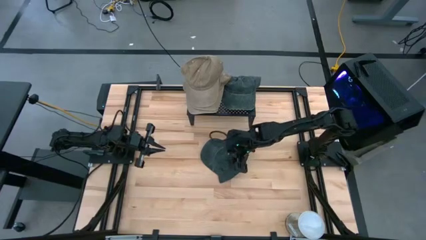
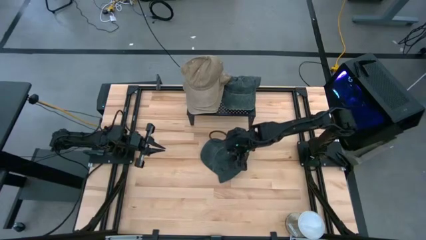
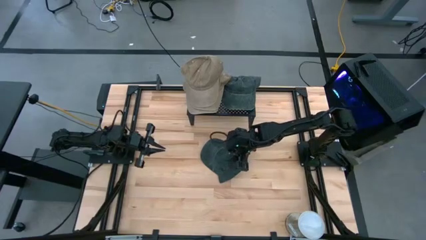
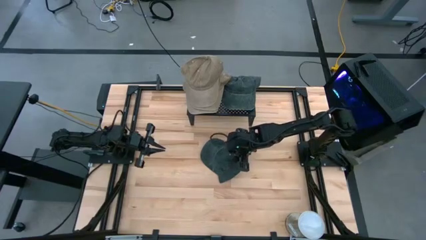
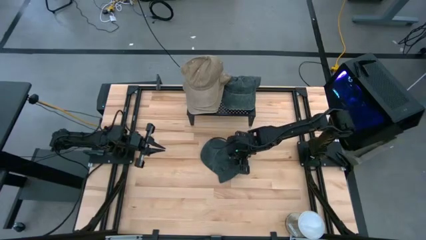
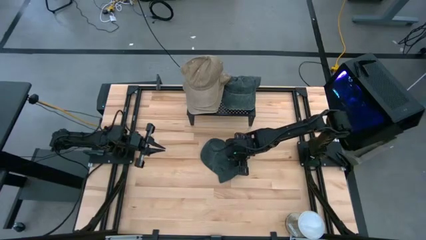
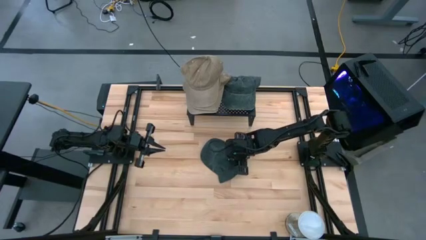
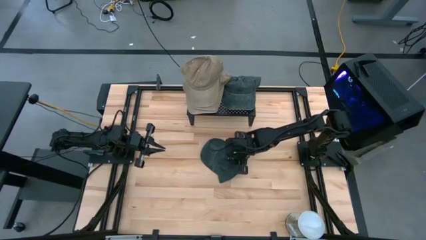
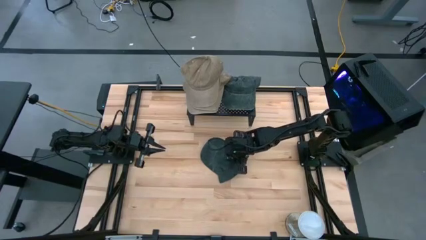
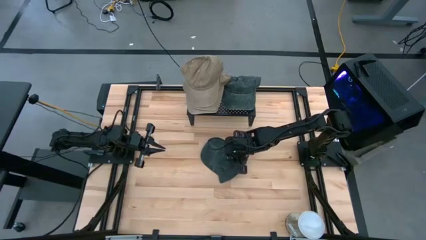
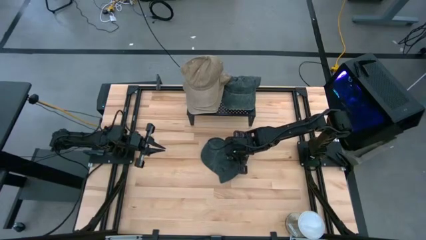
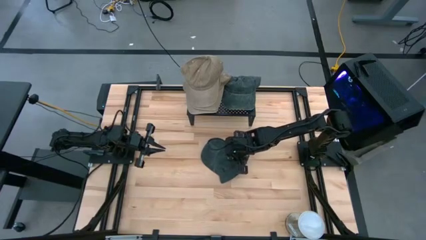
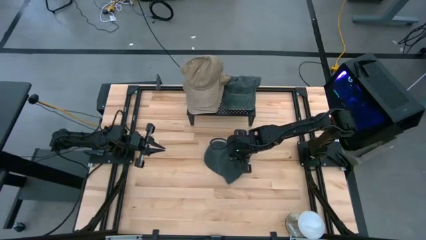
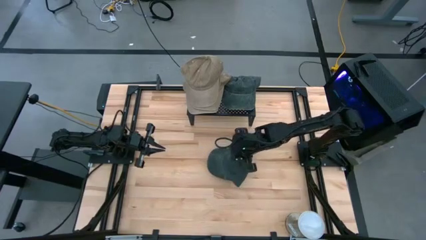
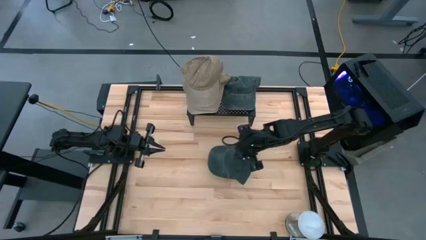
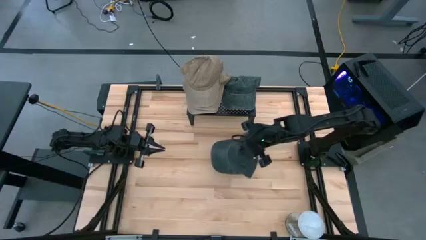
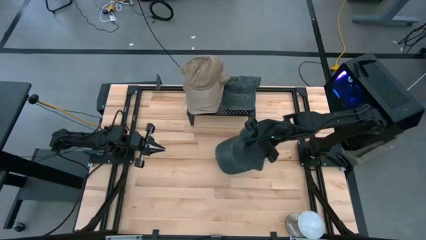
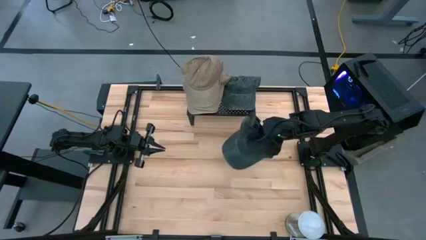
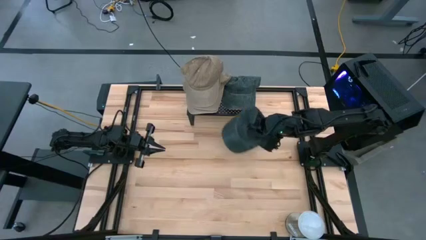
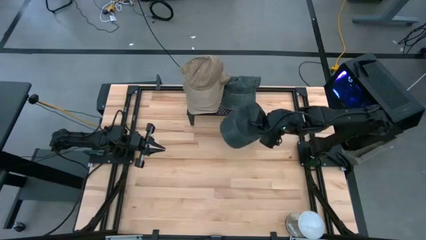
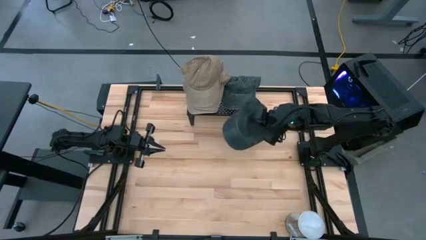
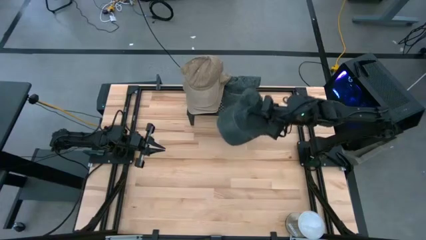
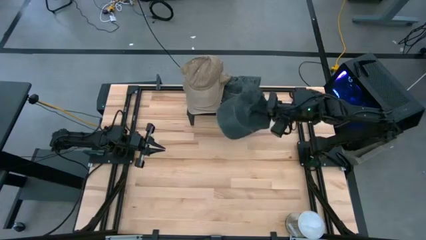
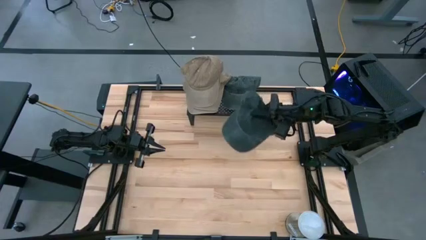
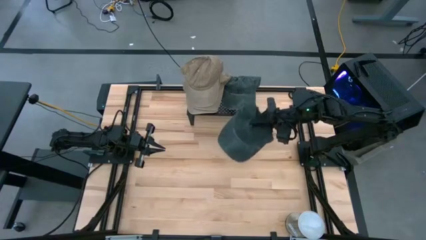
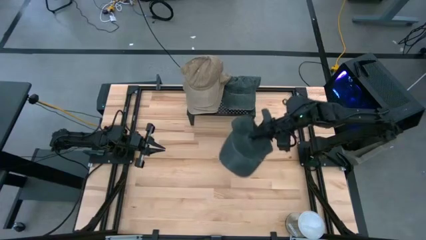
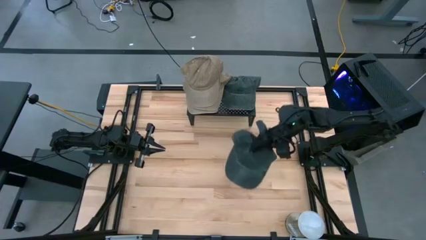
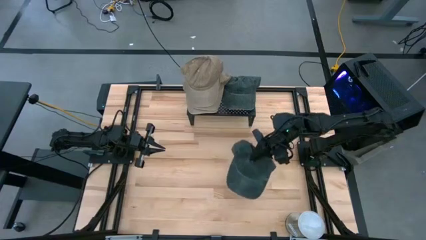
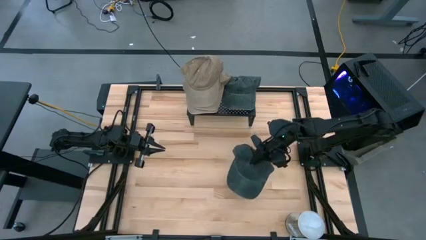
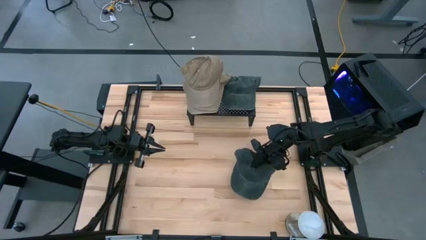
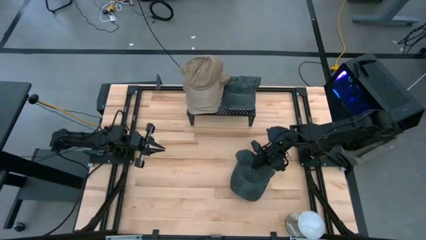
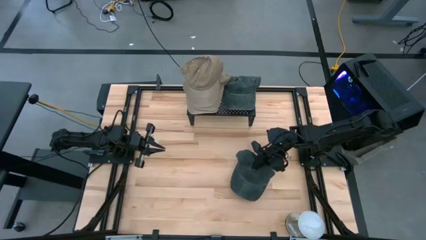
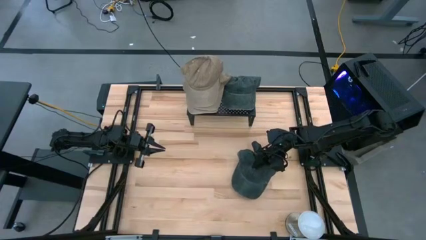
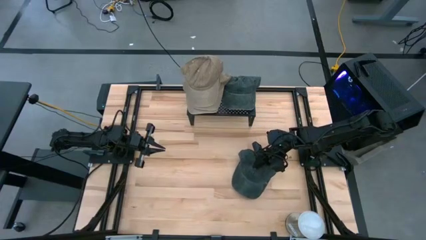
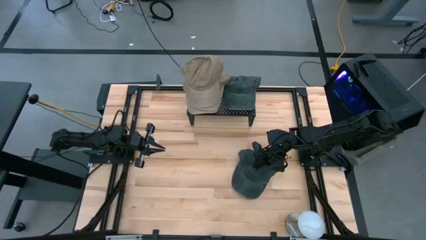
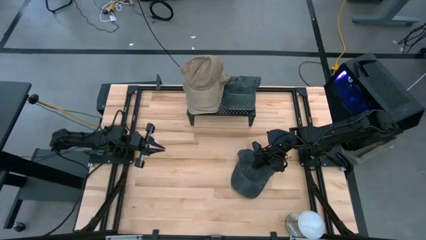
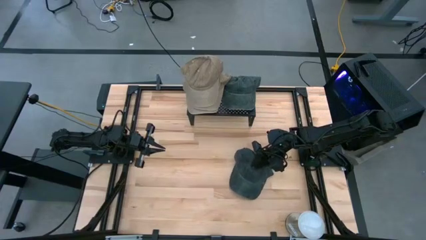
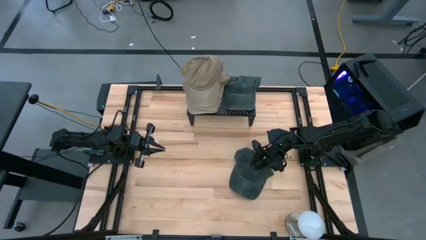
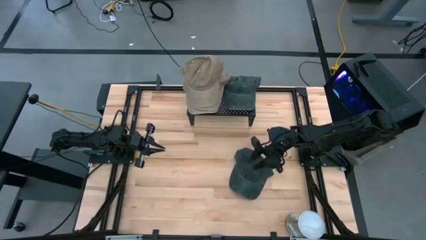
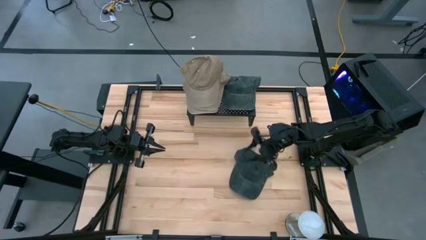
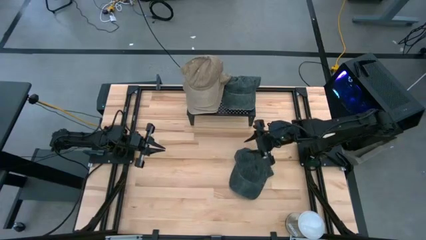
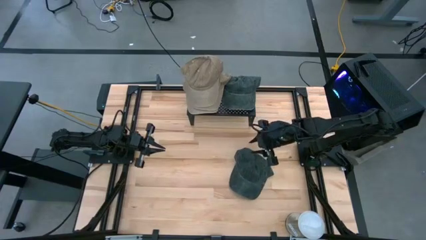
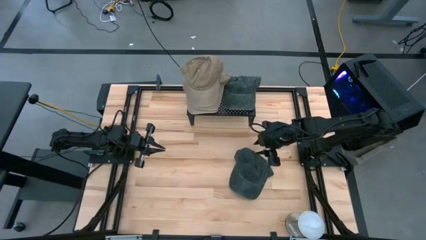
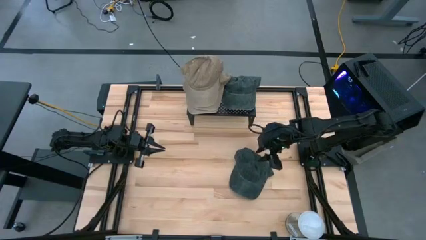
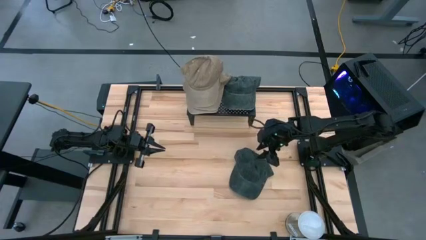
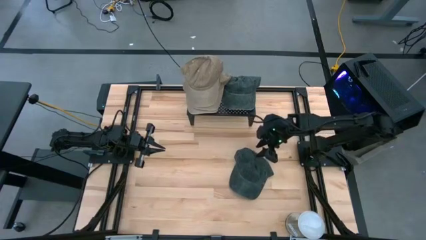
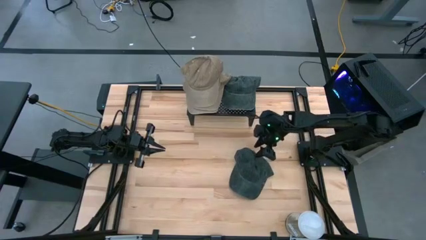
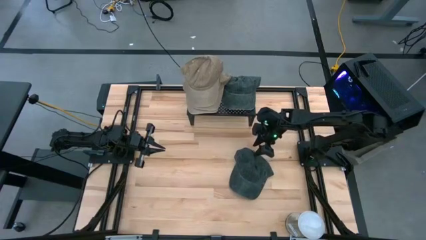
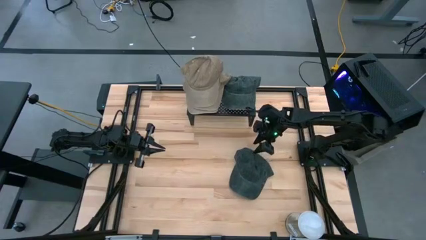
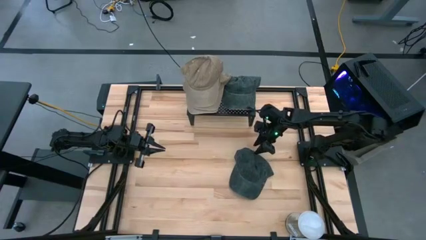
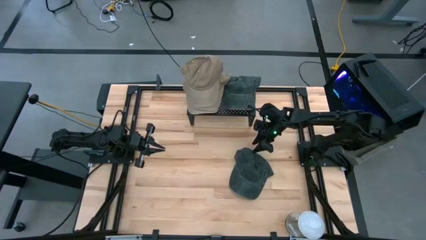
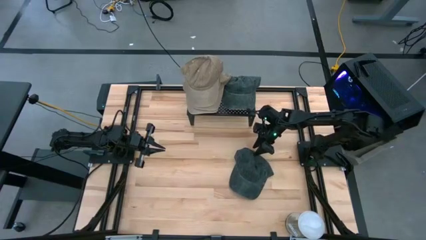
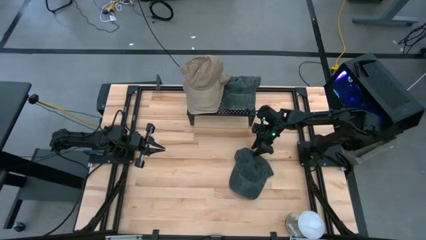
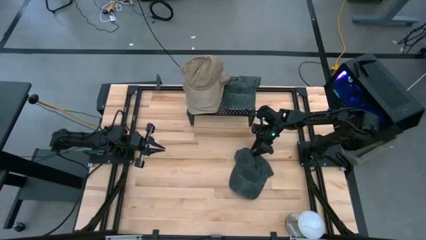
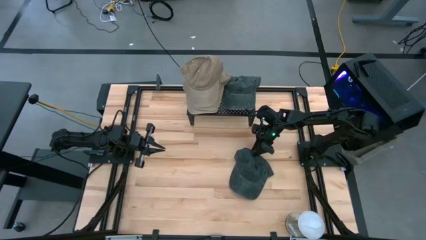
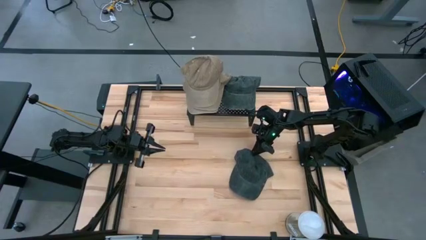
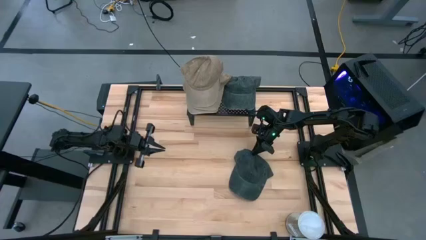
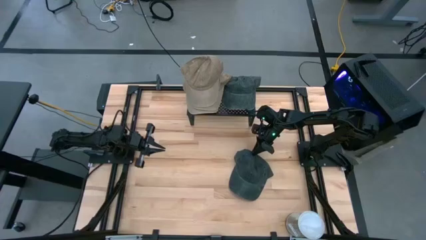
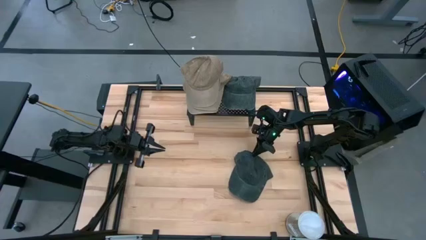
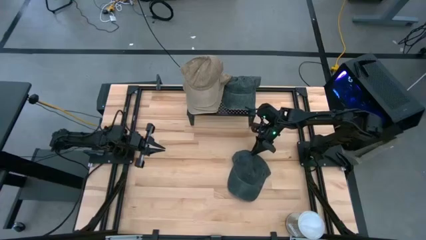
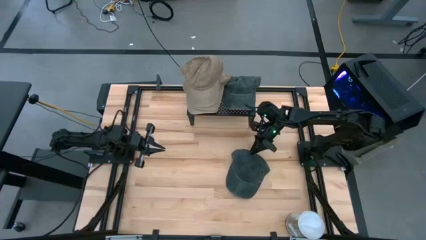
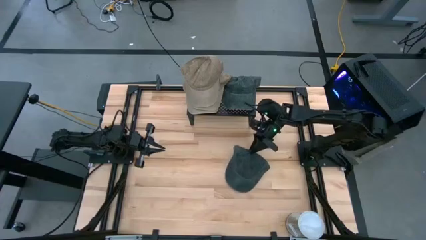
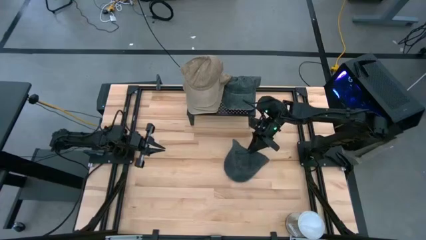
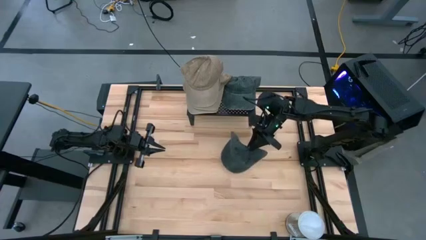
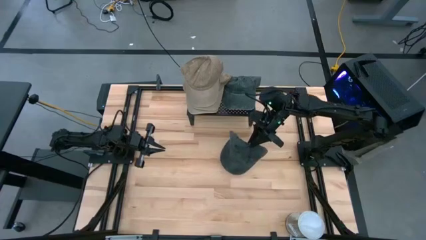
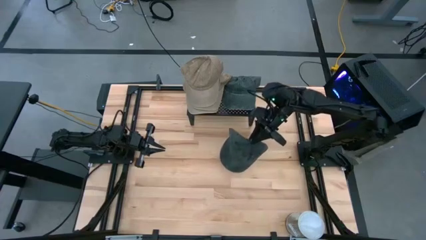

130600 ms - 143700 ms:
Task: Pick & Place hat
Stack the black cap on the other black cap on the shelf

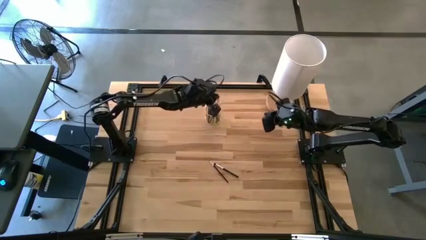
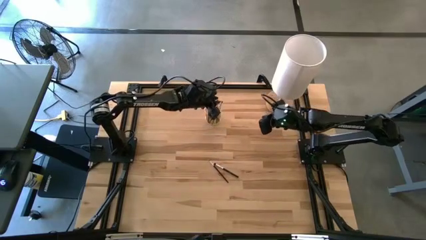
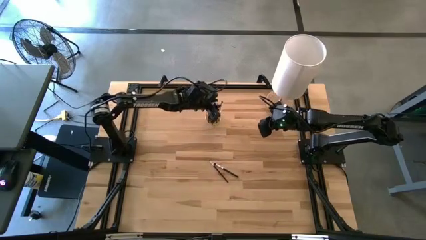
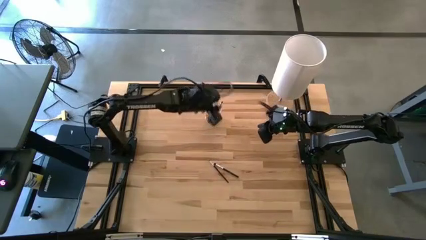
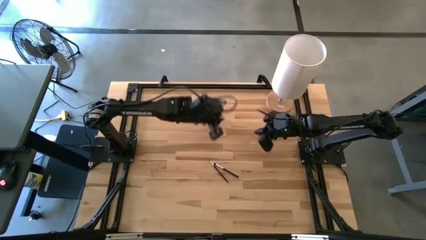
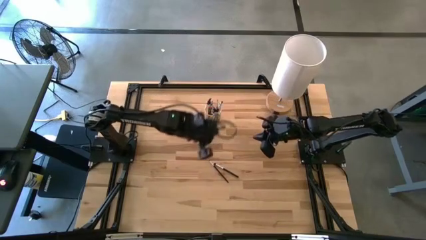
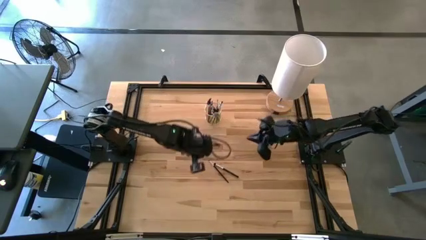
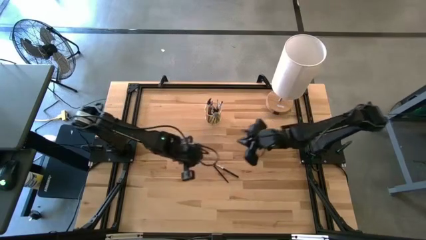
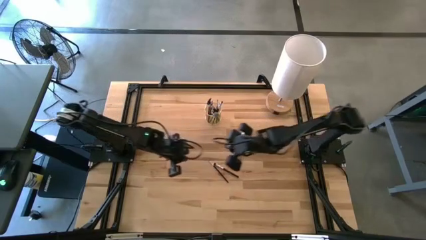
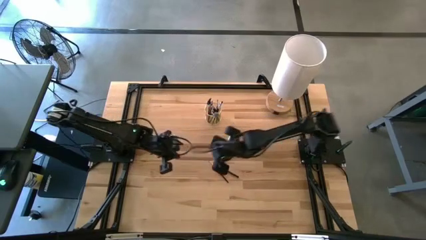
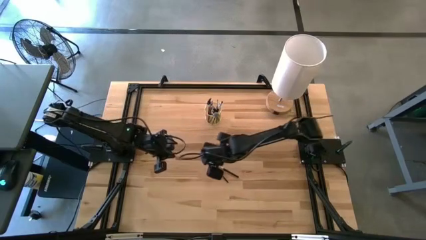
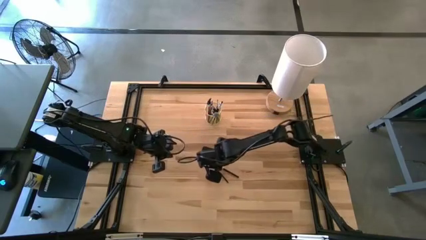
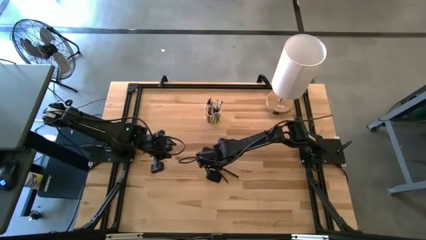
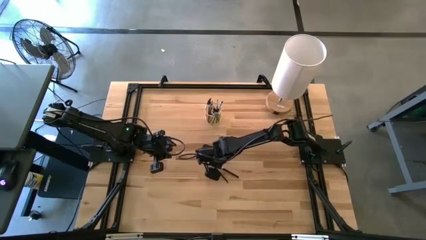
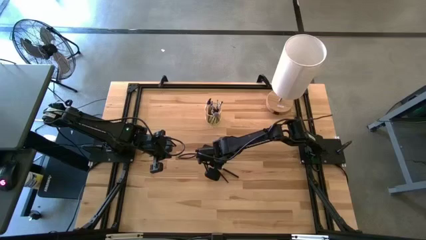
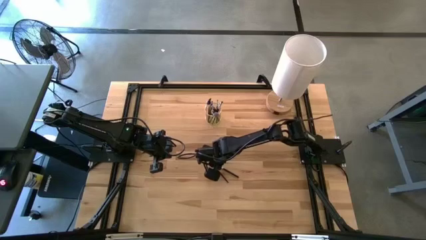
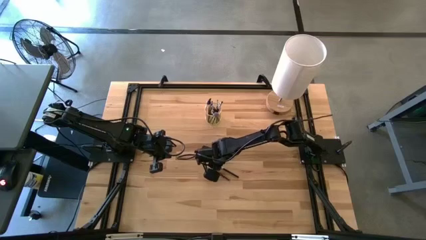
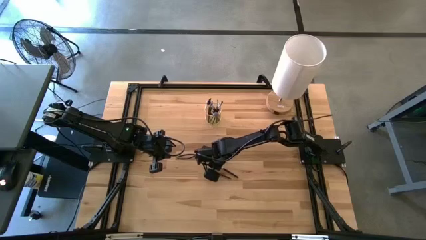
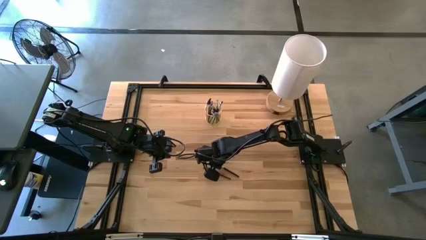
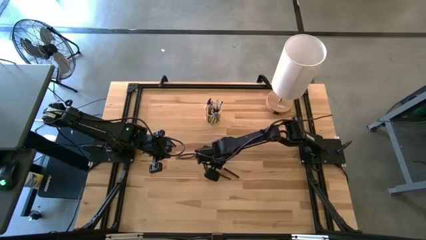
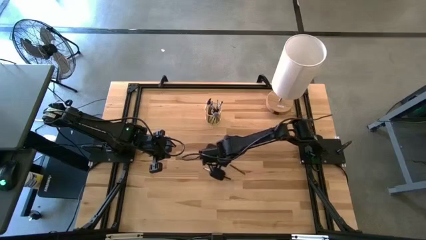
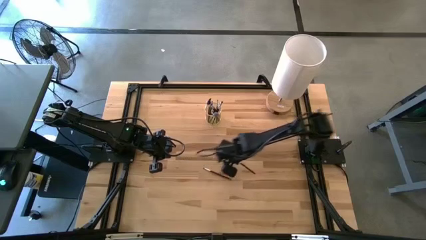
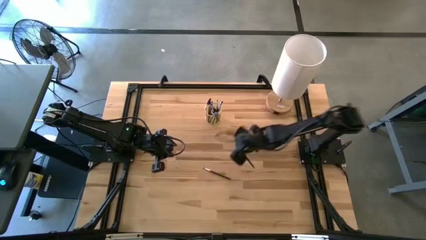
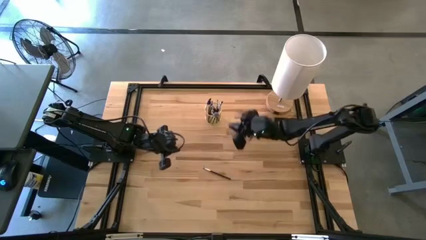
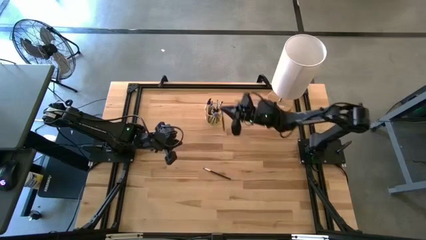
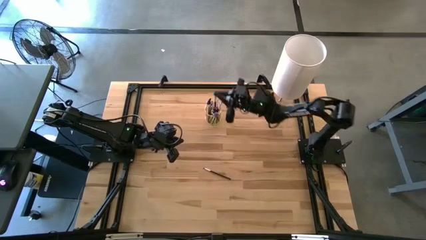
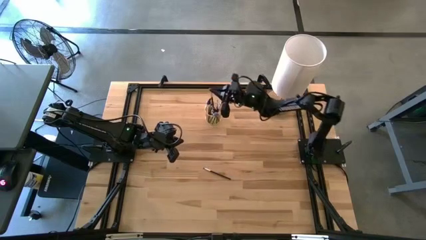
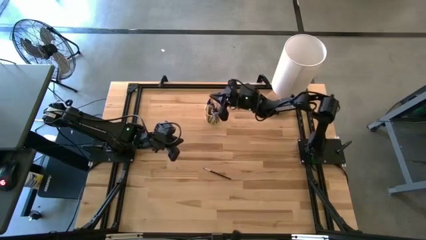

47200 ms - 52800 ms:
Task: Put items in baskets/containers
Put the foundation brush into the pen holder
